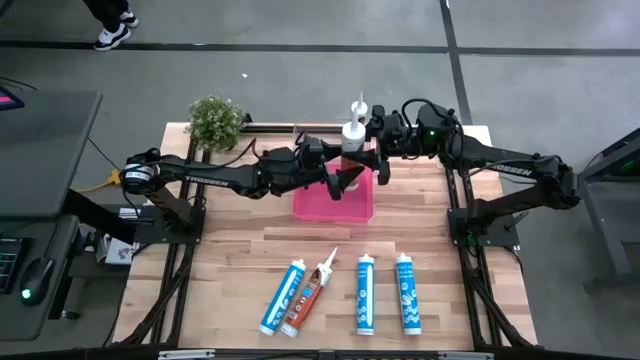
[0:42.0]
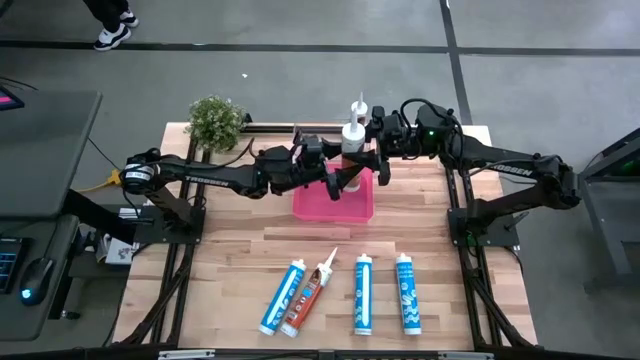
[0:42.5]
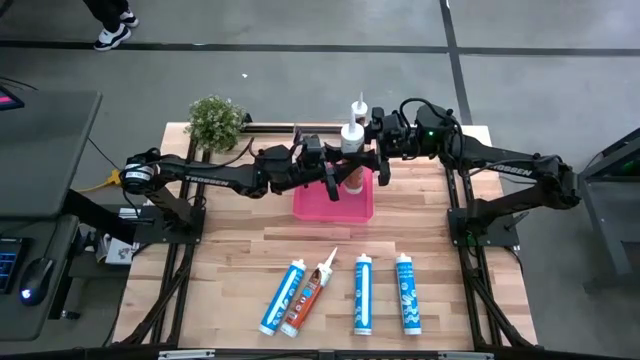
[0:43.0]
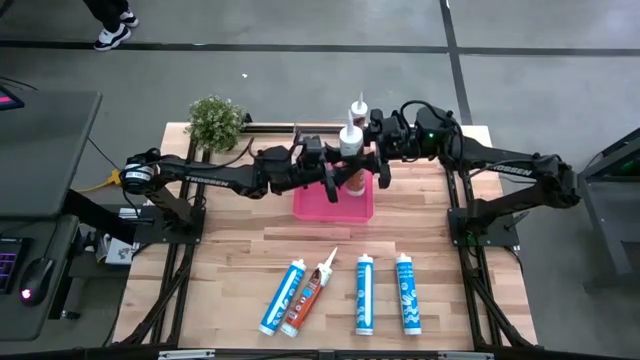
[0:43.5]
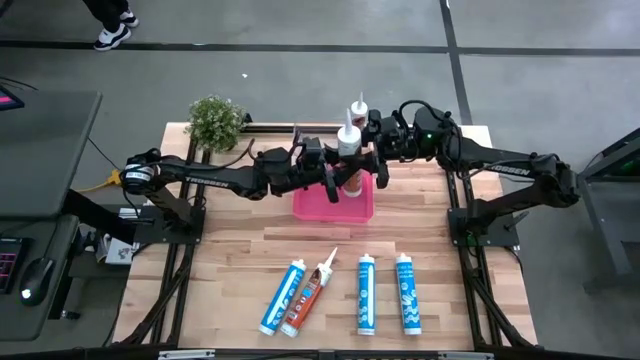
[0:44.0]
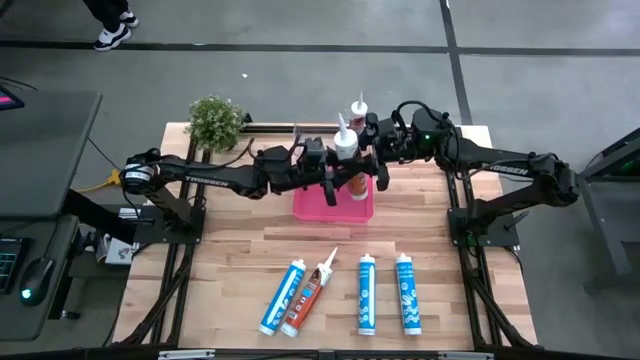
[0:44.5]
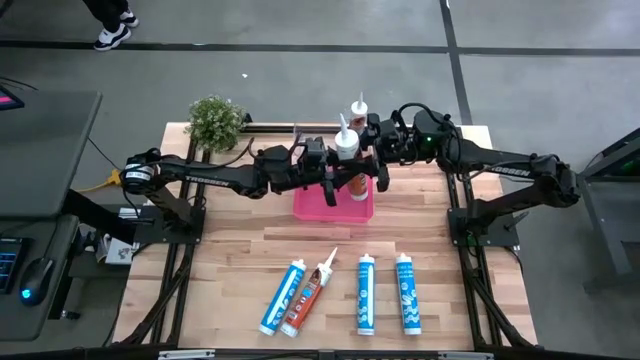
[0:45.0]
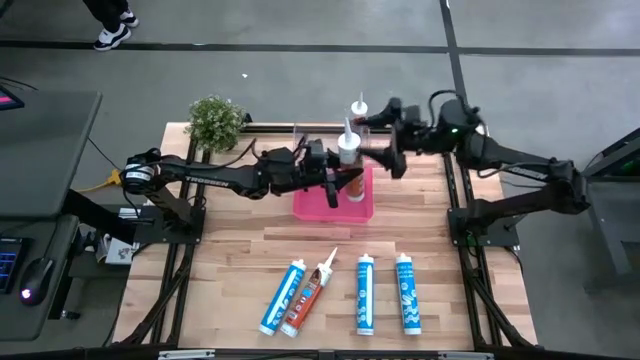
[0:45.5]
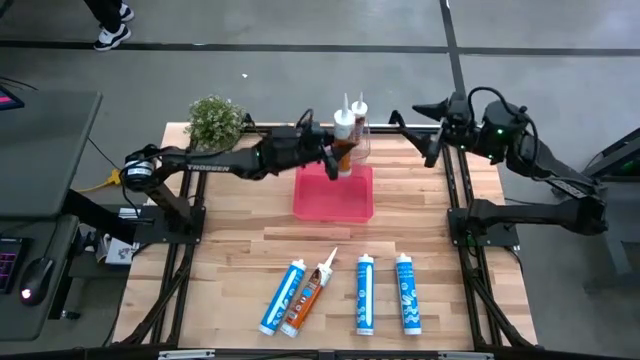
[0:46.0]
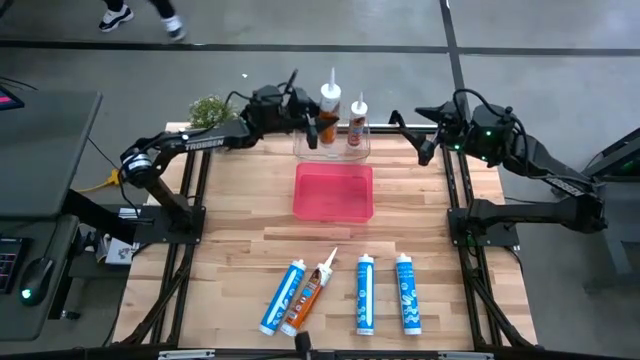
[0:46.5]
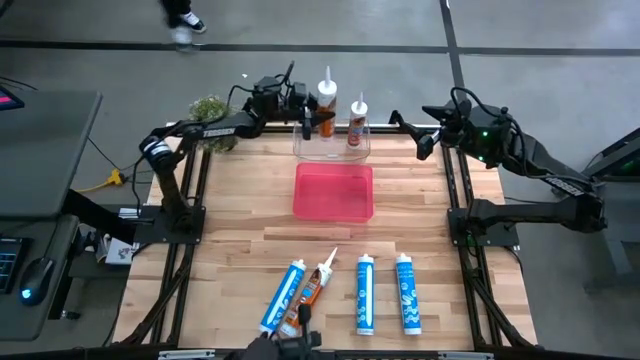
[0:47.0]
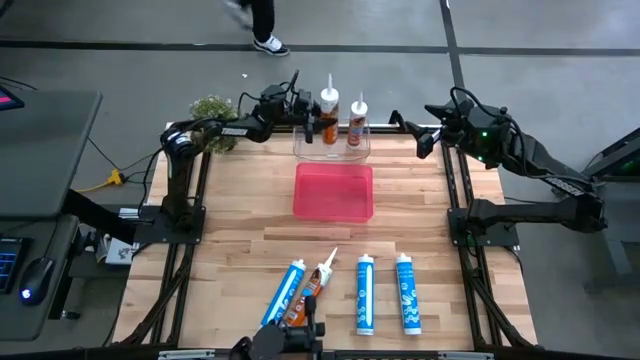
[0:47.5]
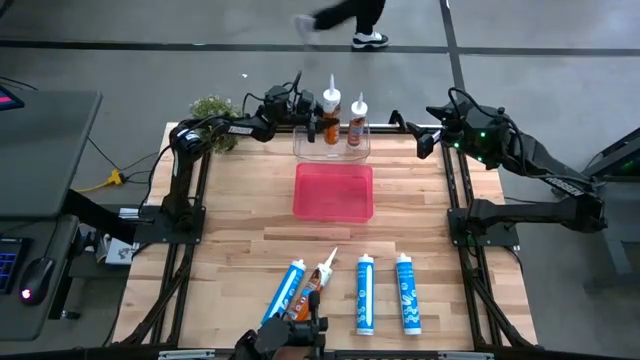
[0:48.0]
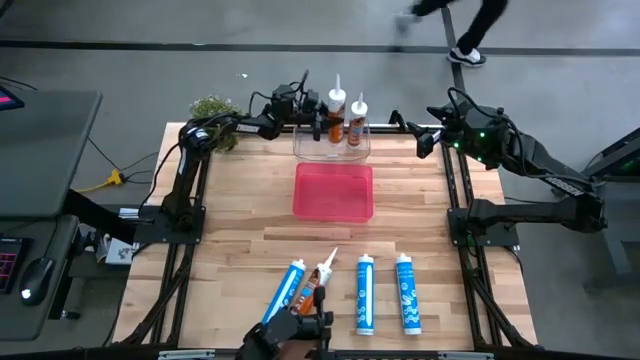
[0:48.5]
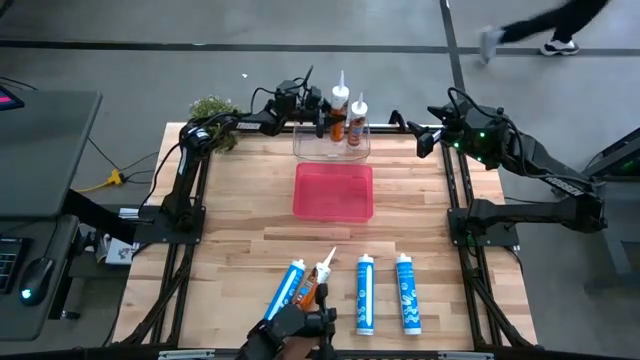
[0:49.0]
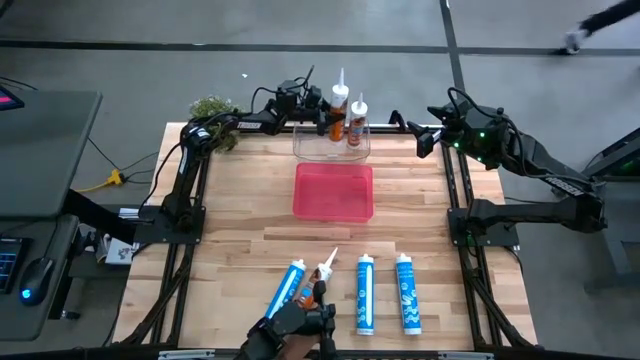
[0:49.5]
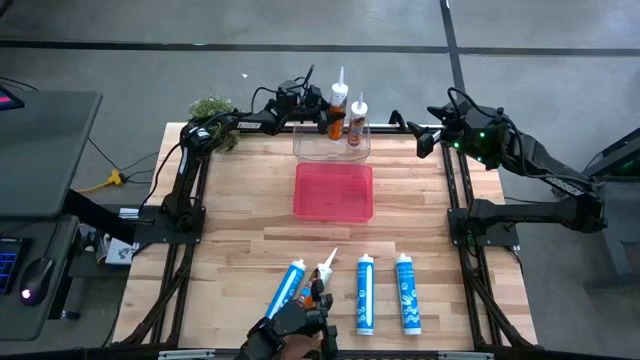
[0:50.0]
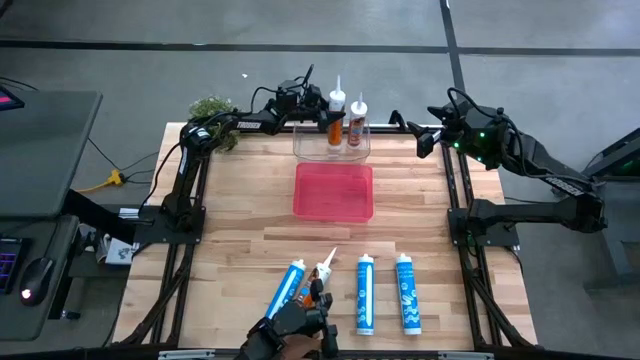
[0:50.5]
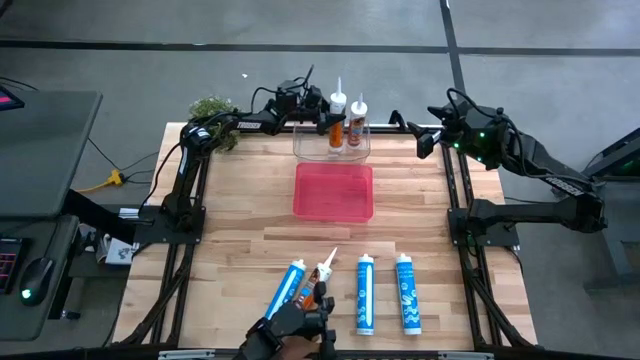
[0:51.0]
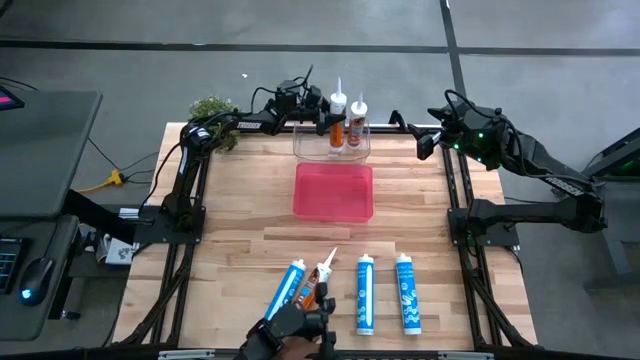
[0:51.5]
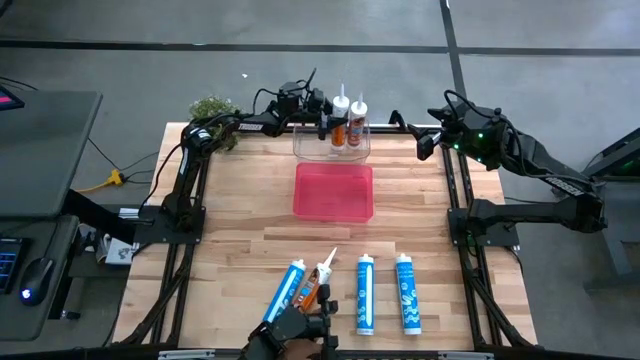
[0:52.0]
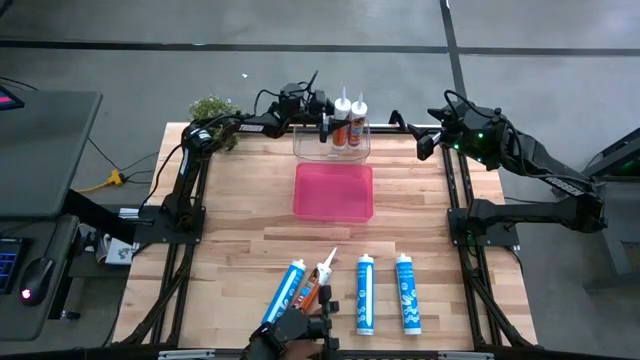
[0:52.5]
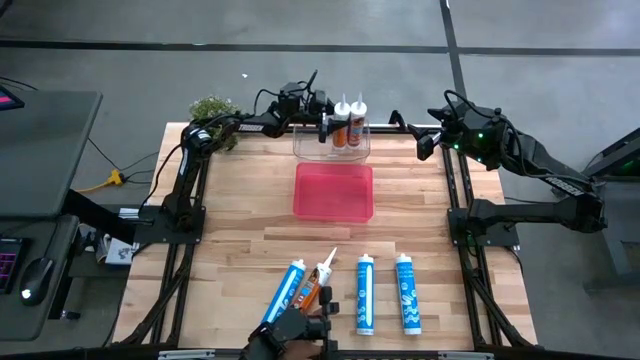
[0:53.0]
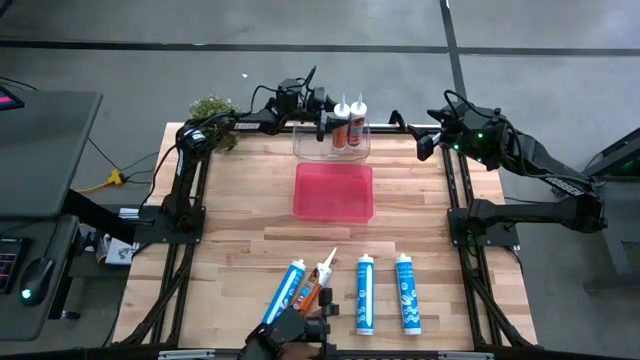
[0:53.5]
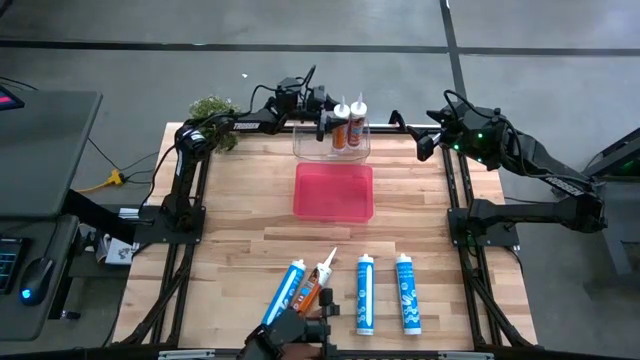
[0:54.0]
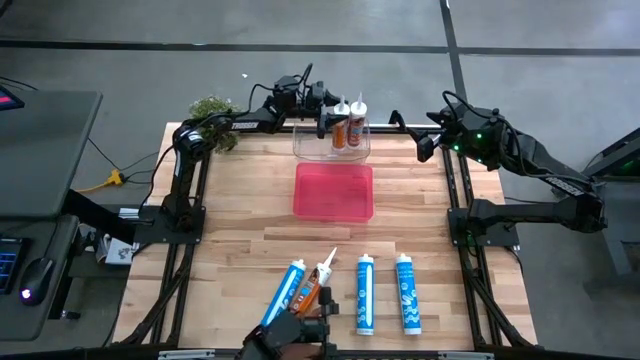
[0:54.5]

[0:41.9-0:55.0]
Task: Pick & place silicon tubes, Sealant and Lysol wipes
Put the right orange sealant into the transparent container

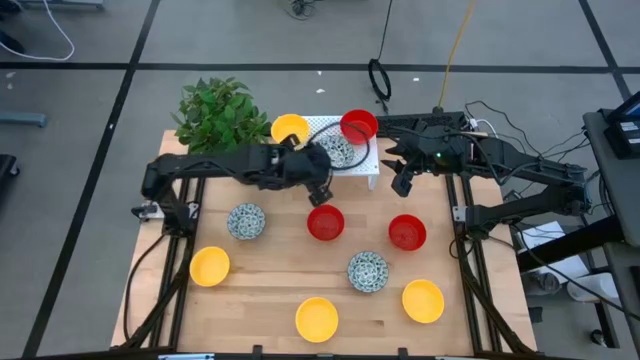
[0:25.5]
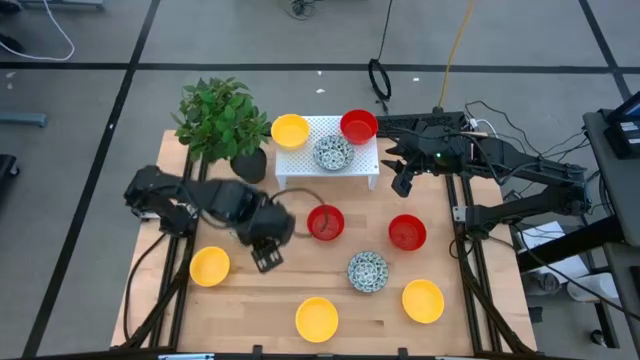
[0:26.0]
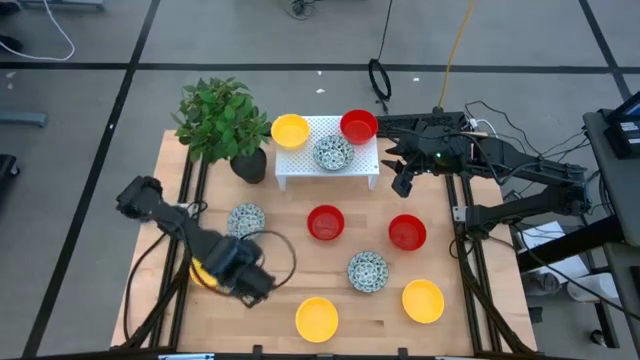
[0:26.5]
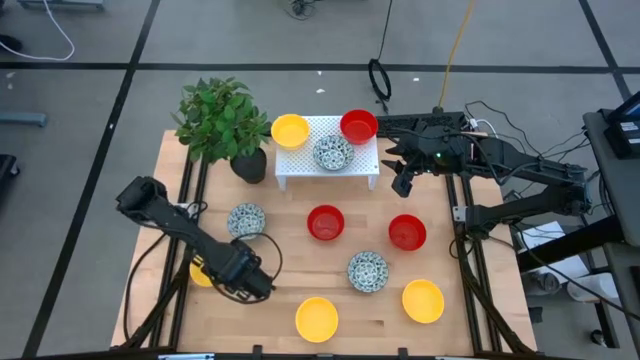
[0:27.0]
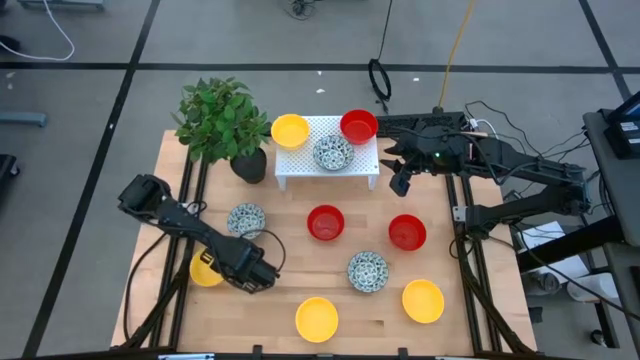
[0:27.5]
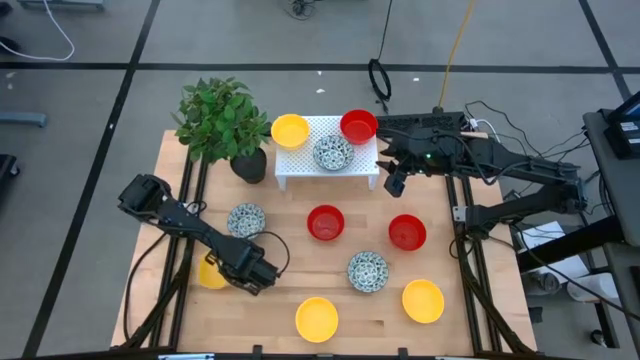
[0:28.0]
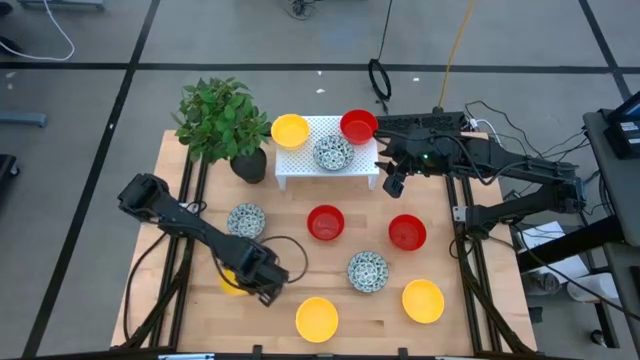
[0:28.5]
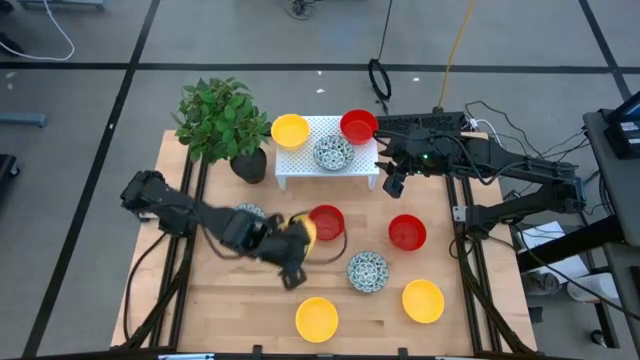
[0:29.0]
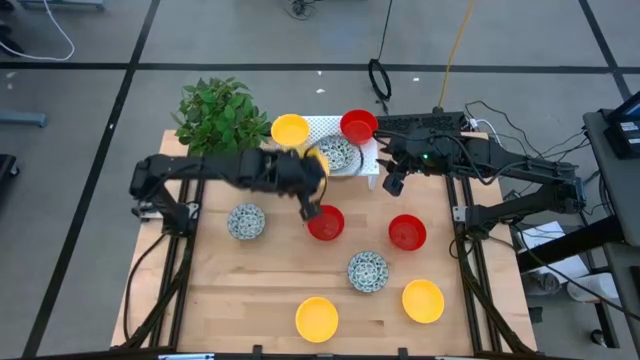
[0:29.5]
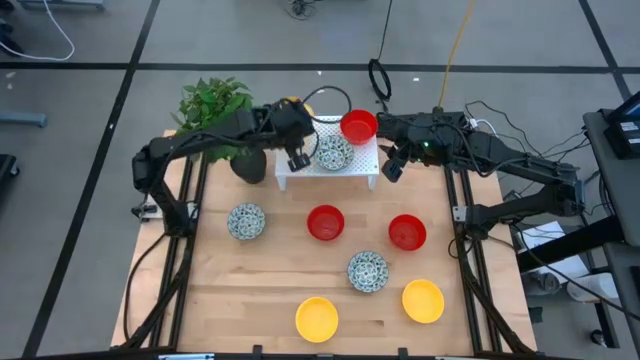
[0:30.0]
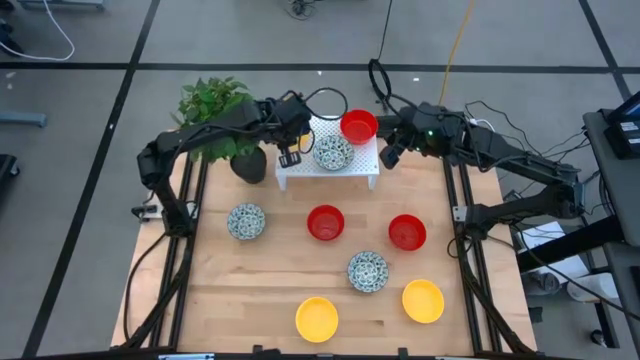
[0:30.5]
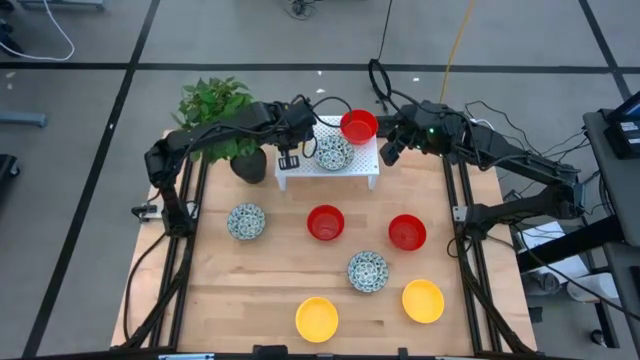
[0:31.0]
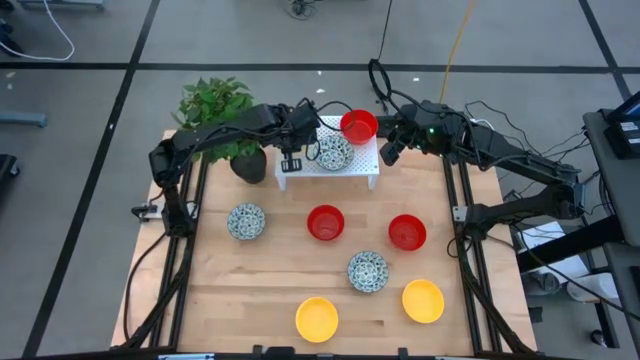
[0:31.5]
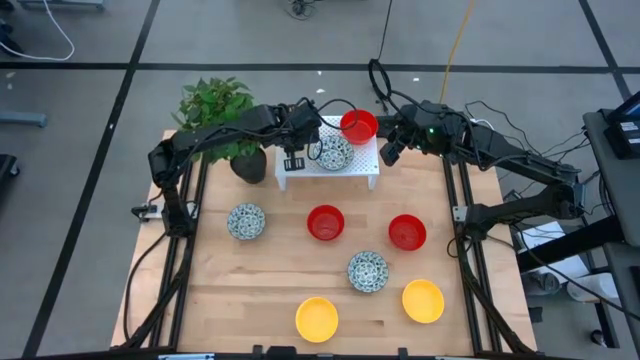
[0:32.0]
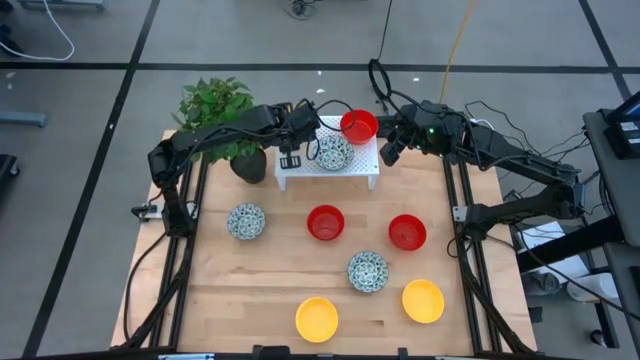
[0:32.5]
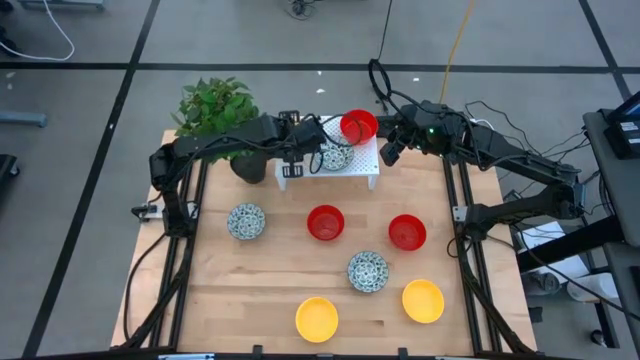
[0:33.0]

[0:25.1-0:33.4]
Task: Pick & Place Mini bowls
Stack the yellow bowl on the yellow bowl on the shelf
